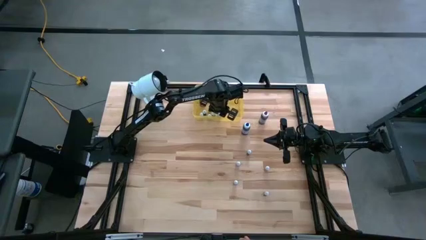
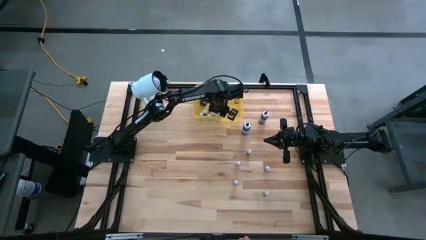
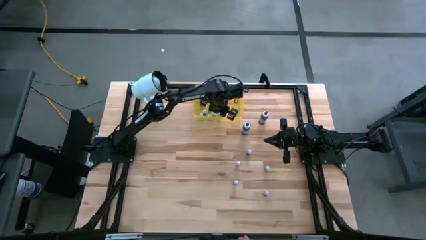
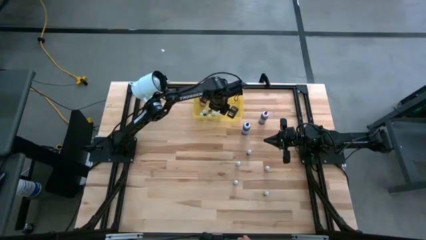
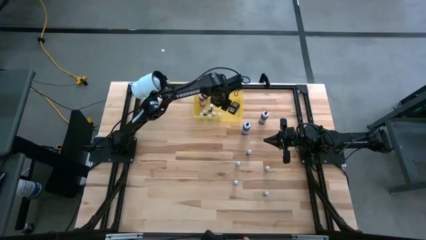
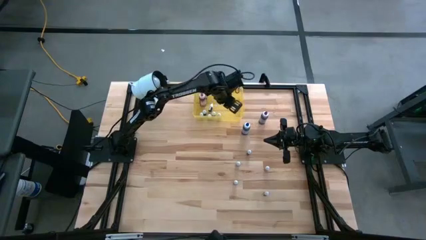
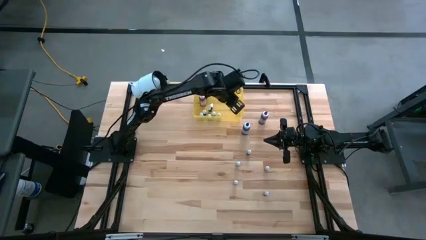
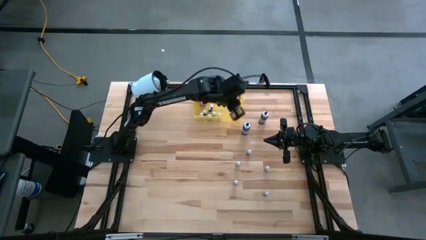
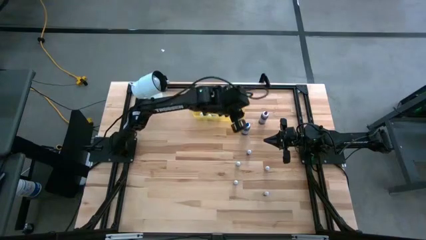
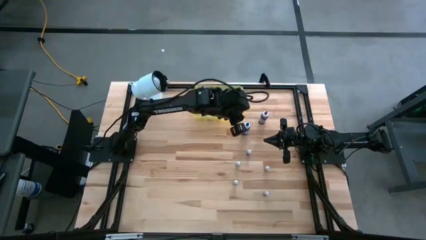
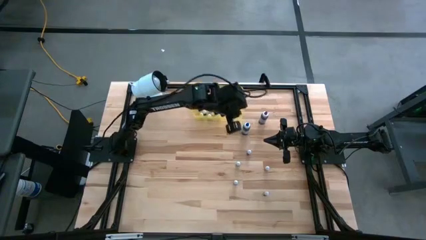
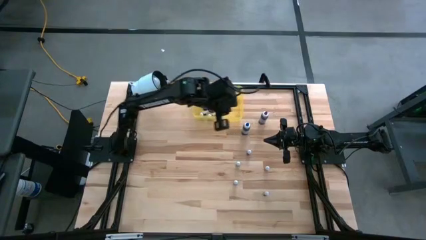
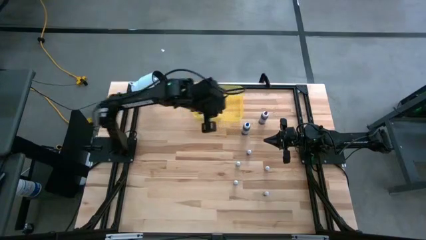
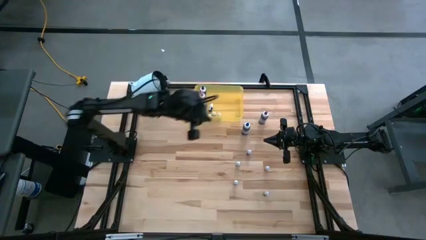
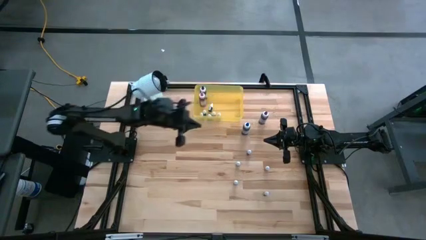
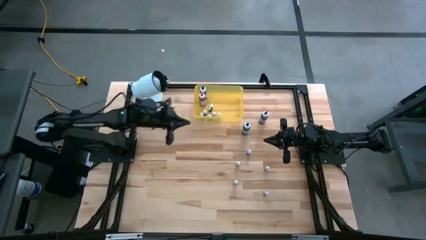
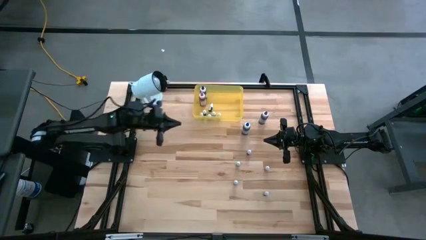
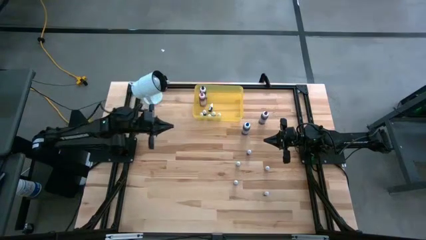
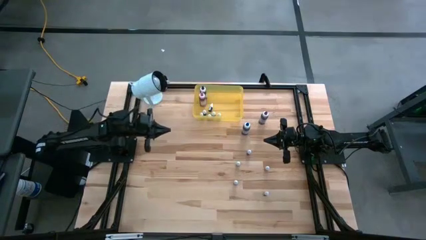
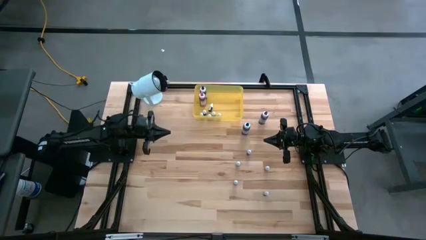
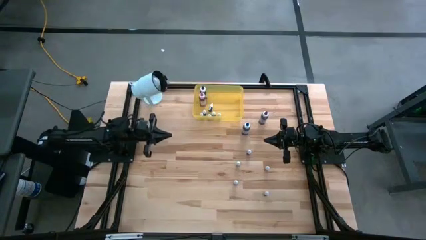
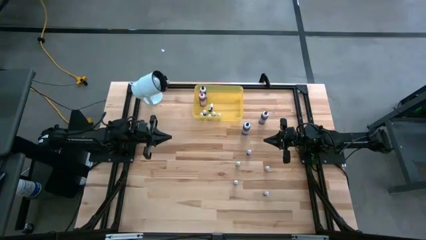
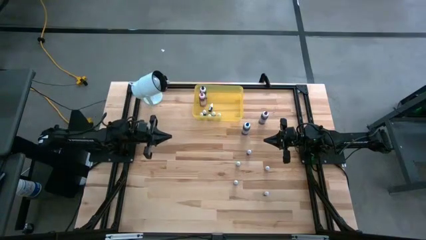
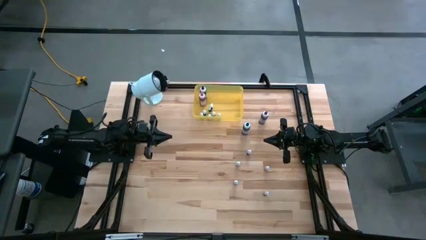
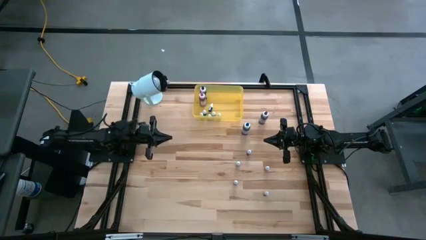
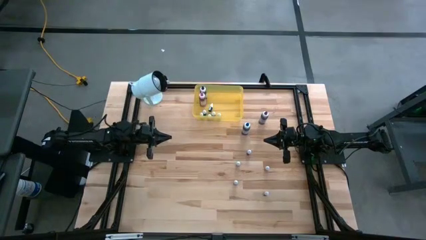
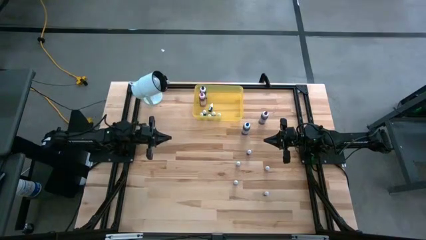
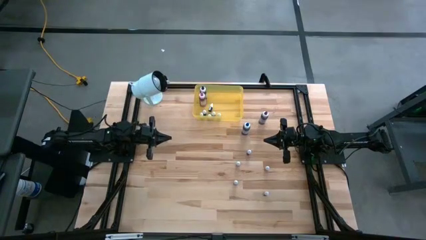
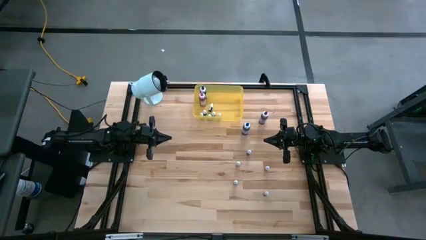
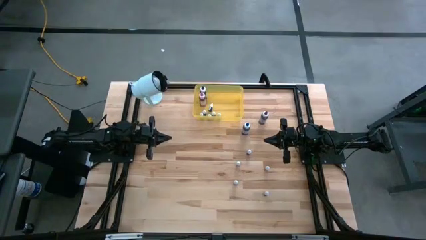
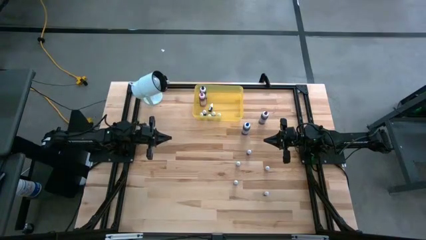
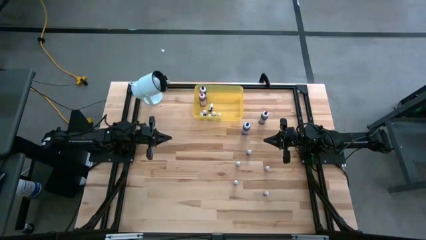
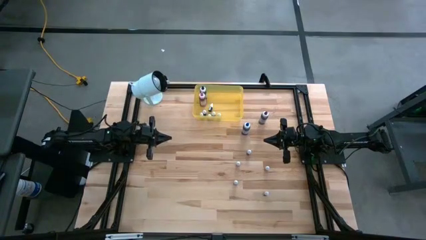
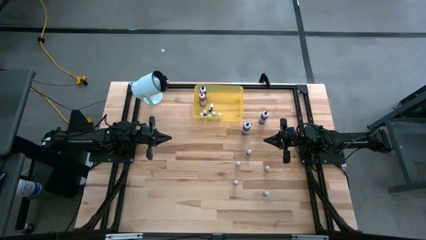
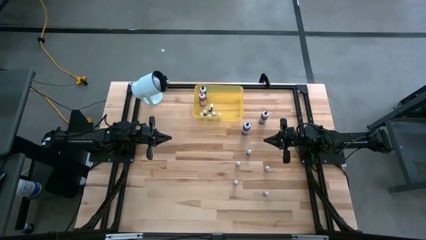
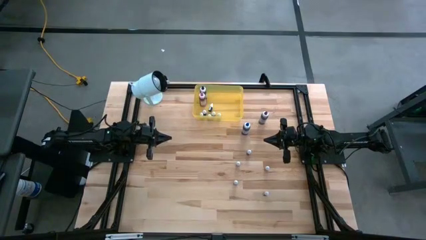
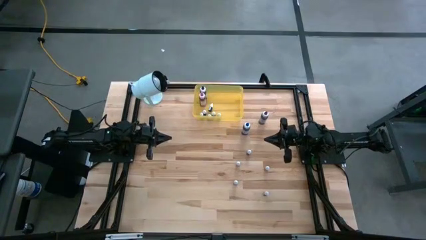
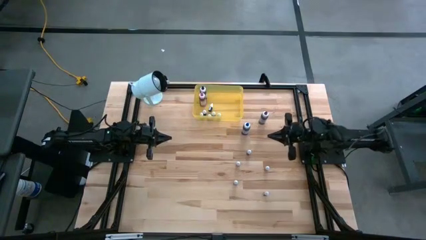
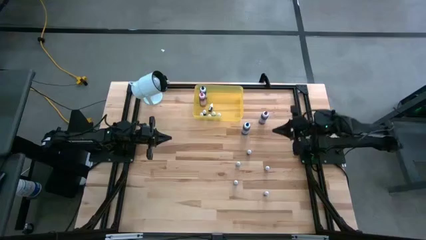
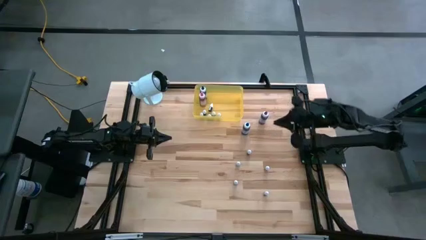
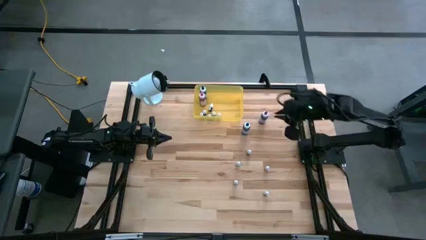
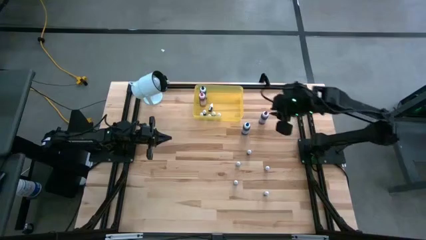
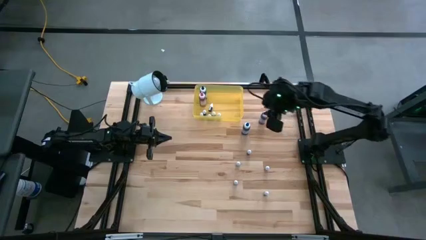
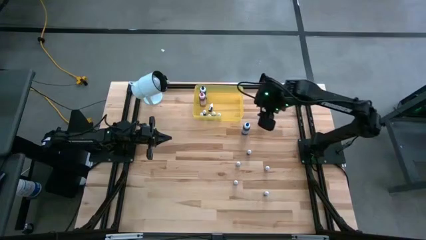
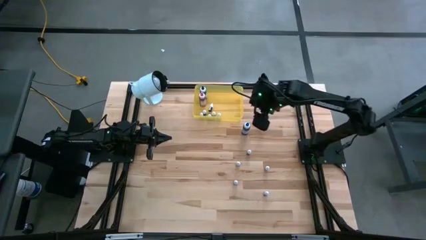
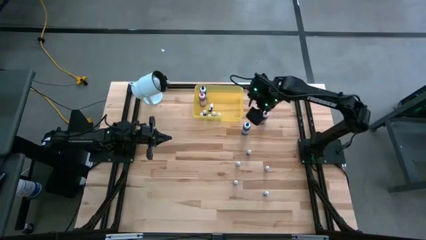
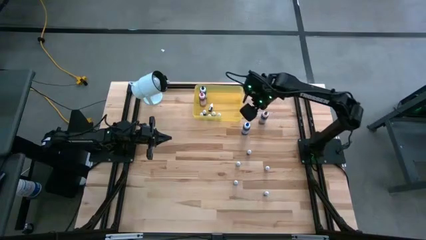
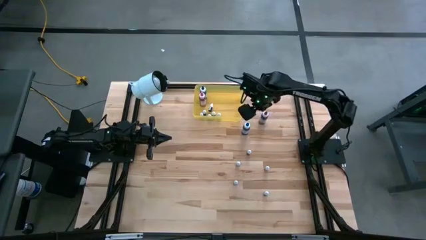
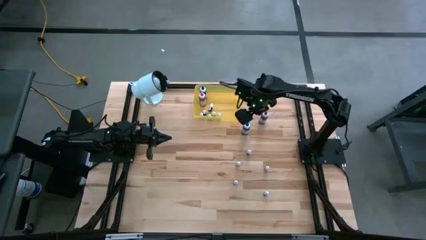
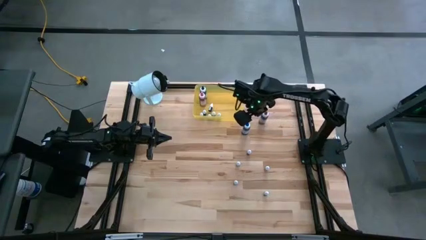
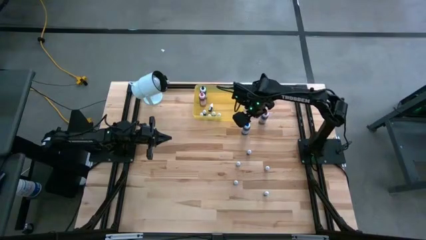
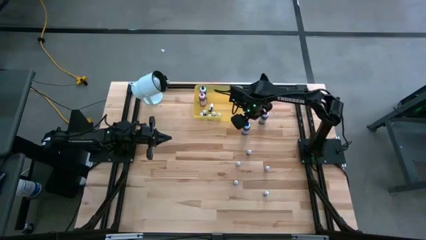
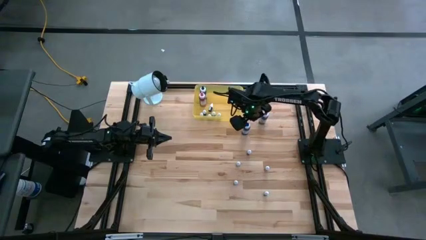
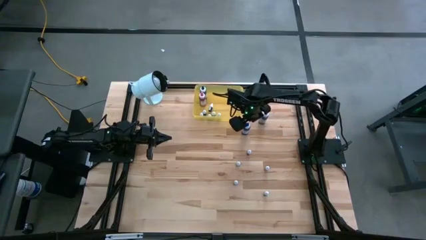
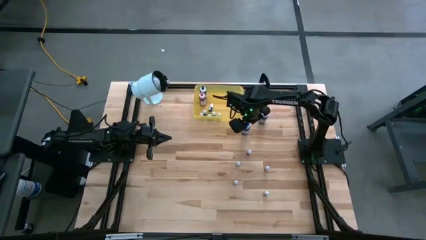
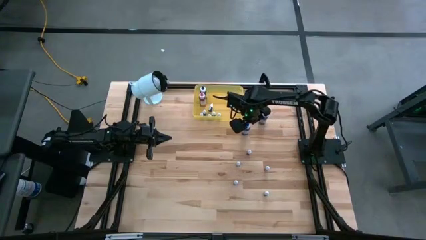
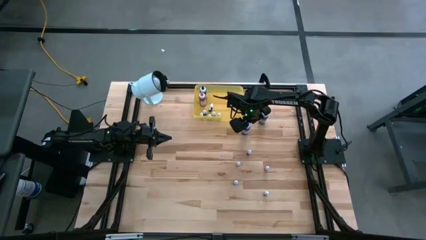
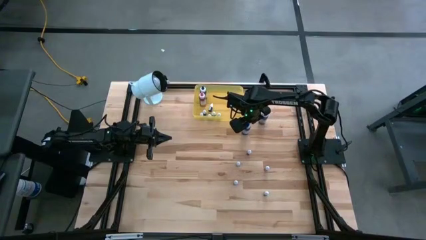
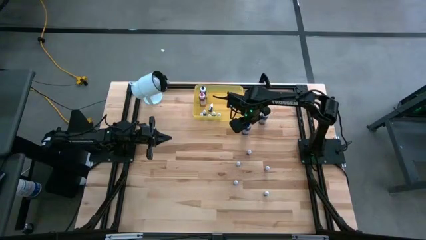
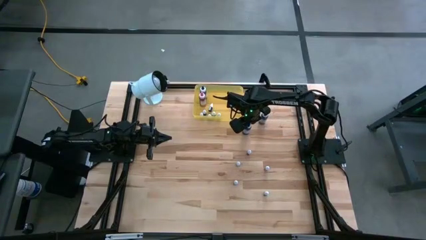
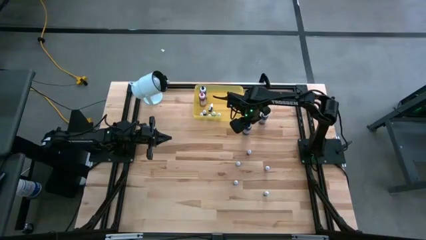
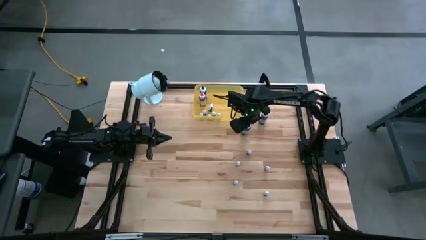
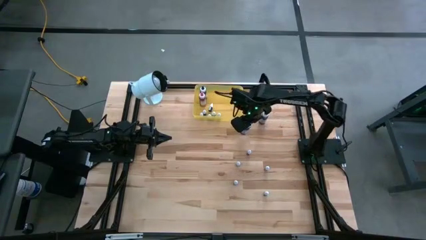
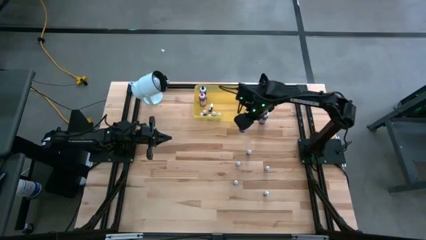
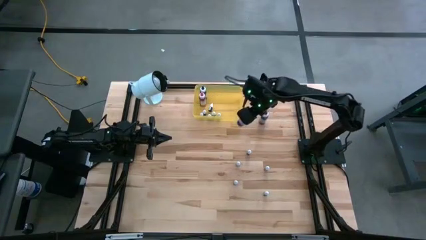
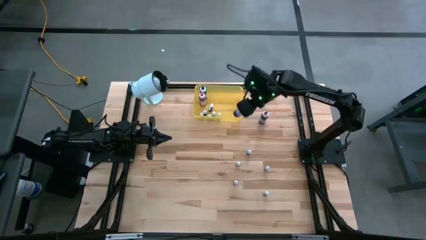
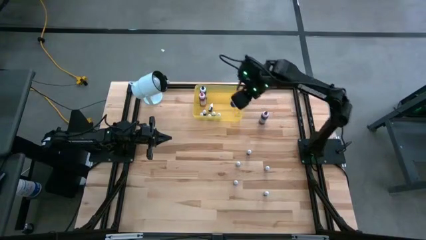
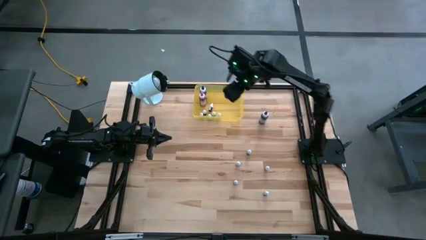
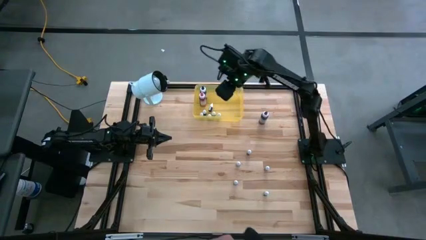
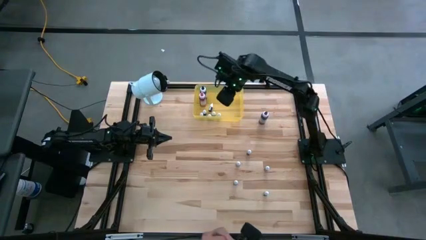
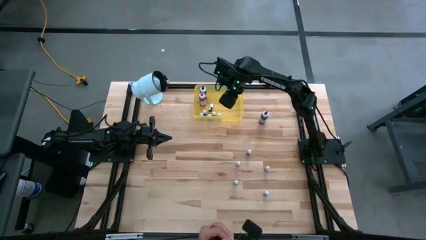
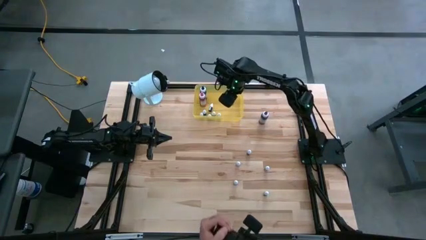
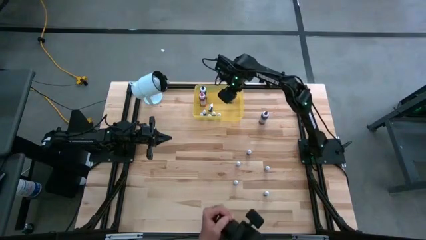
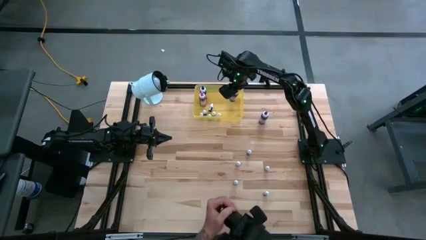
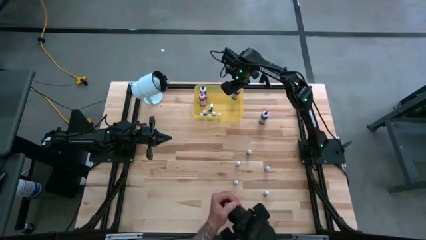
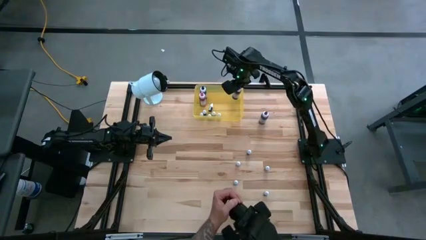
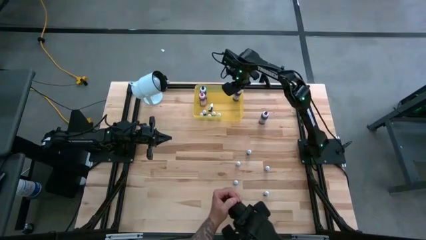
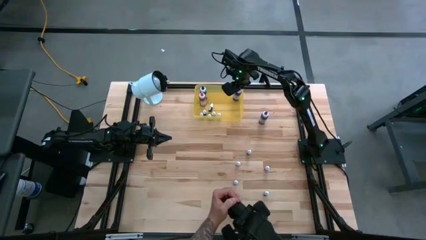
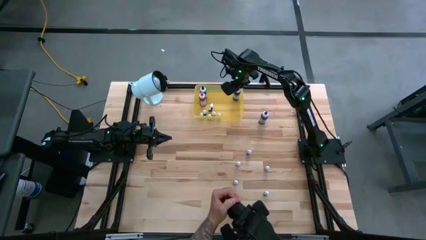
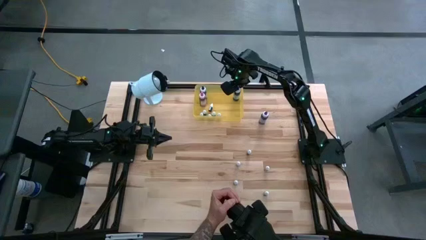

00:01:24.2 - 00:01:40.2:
Task: Pick & Place food coloring
Put the large blue food coloring bottle into the yellow container

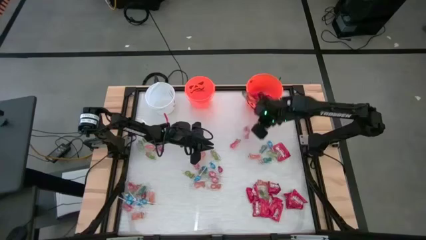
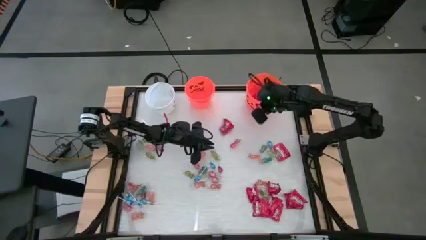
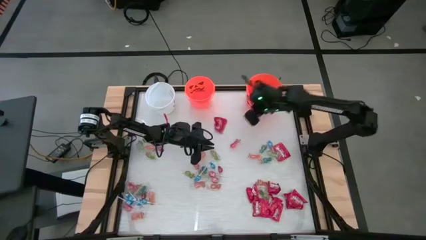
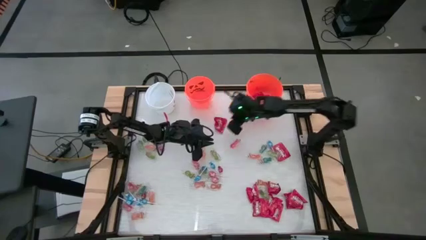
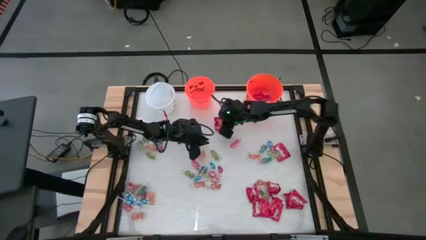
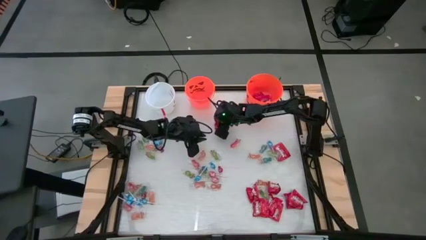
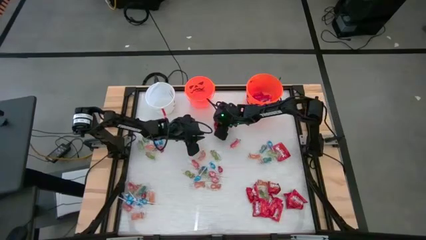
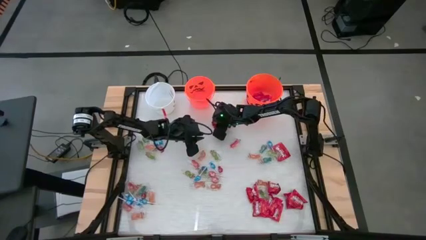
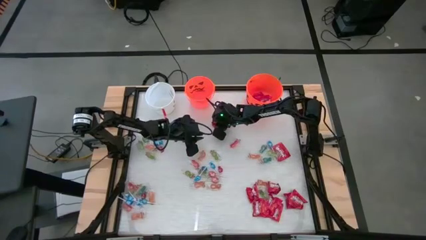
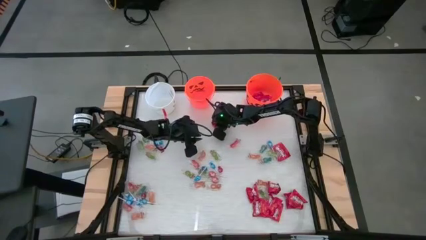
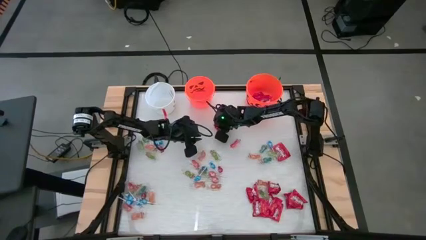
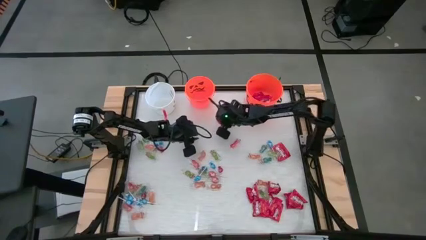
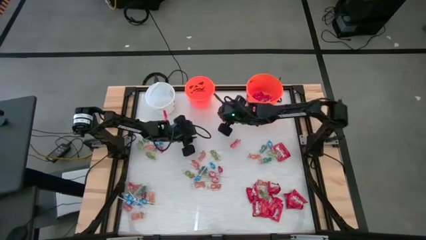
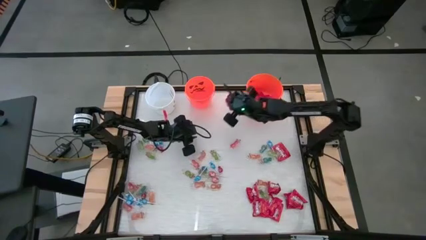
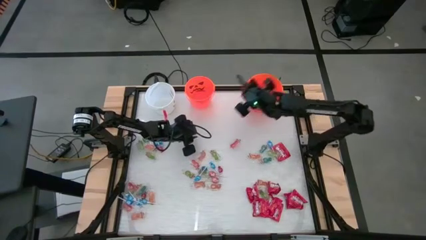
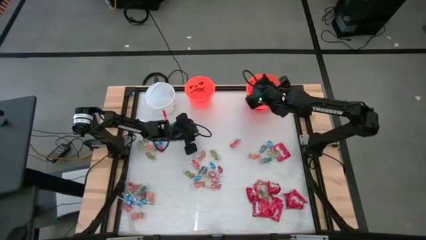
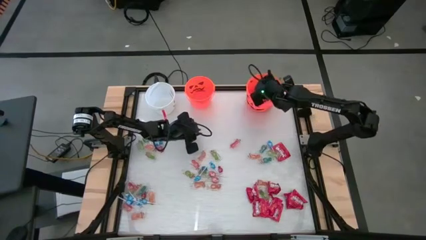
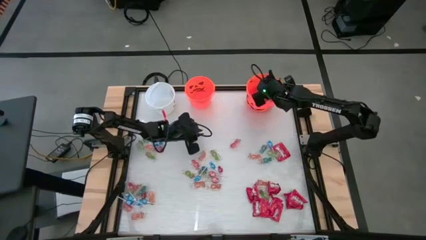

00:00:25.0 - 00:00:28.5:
Task: Sort candy by brand, put in halloween buckets
Put the red candy into the right orange bucket
